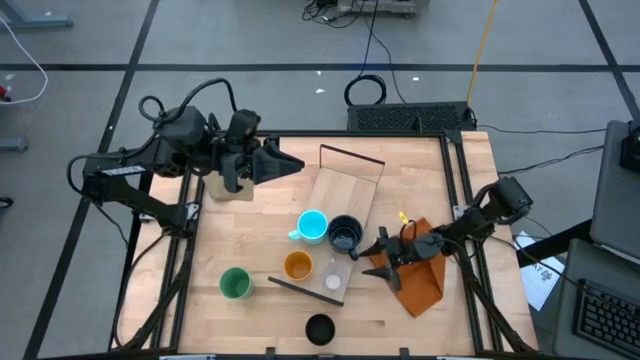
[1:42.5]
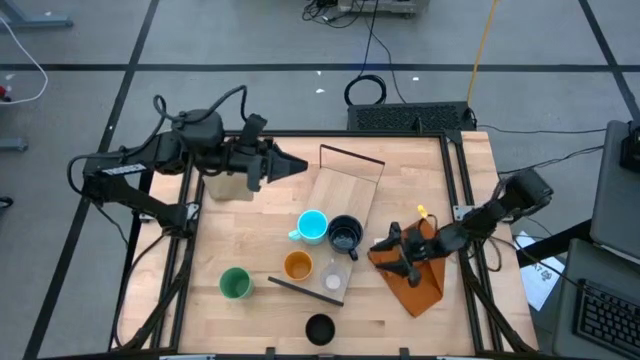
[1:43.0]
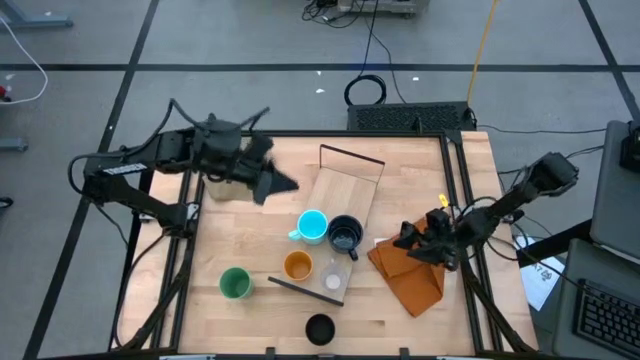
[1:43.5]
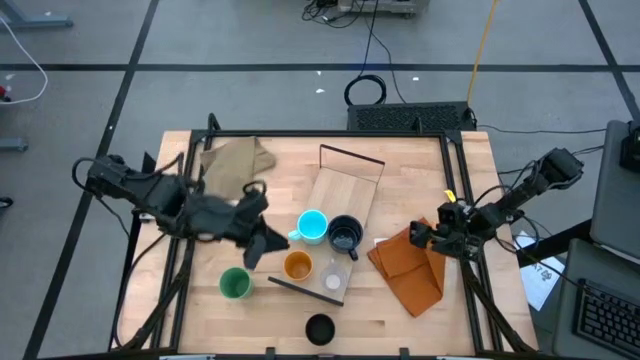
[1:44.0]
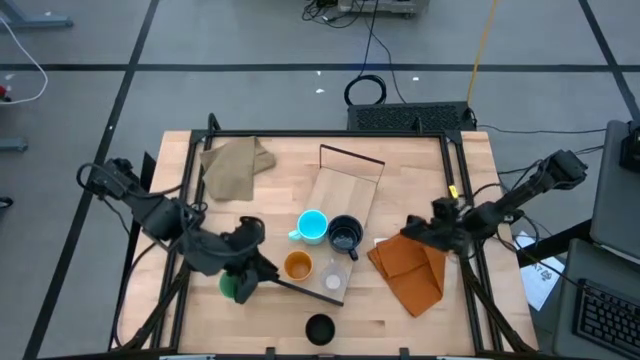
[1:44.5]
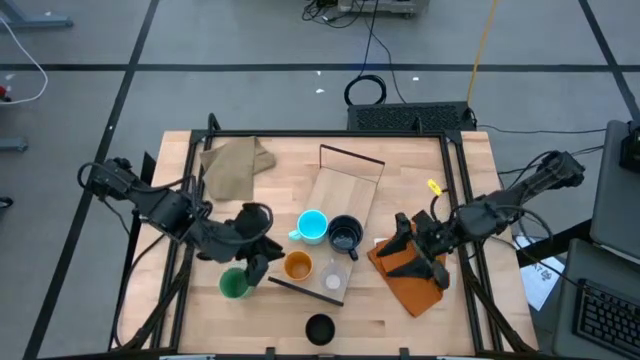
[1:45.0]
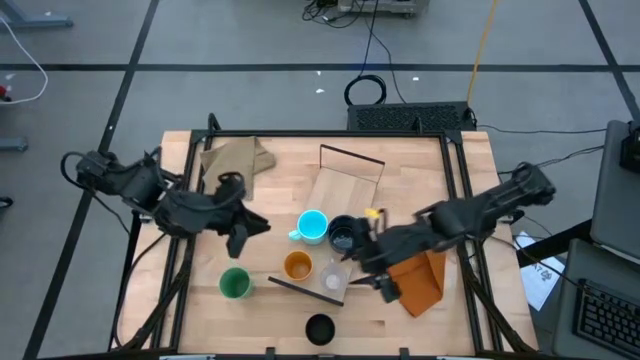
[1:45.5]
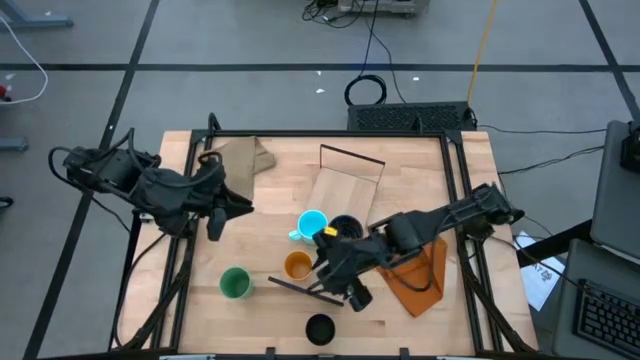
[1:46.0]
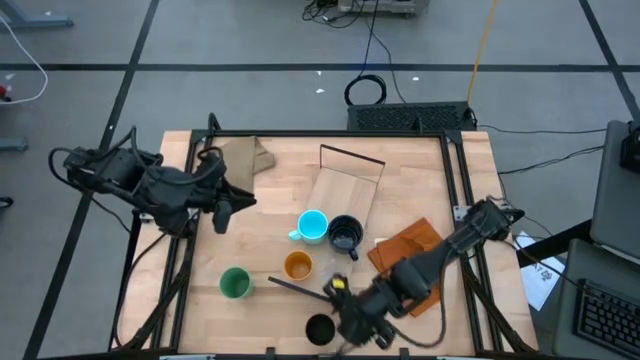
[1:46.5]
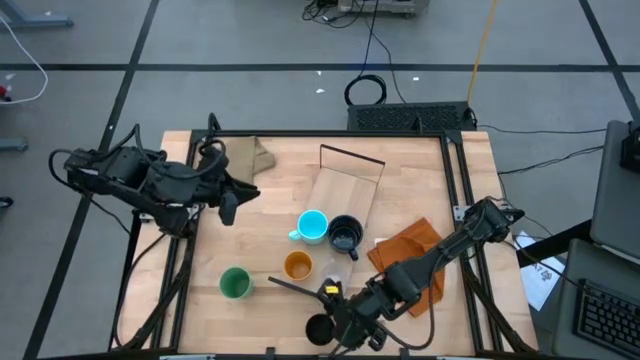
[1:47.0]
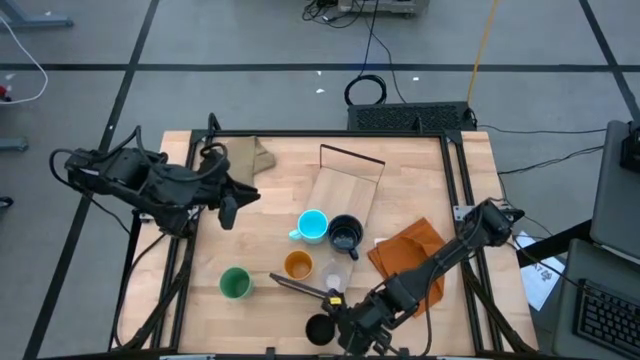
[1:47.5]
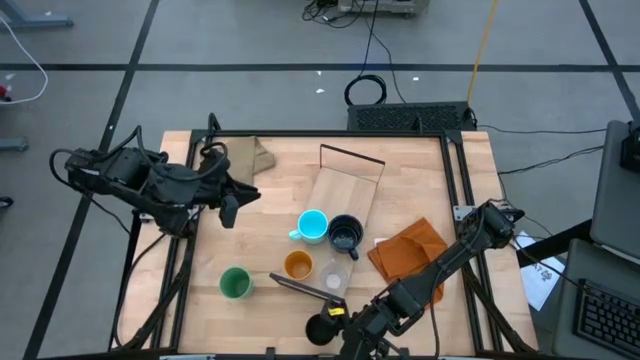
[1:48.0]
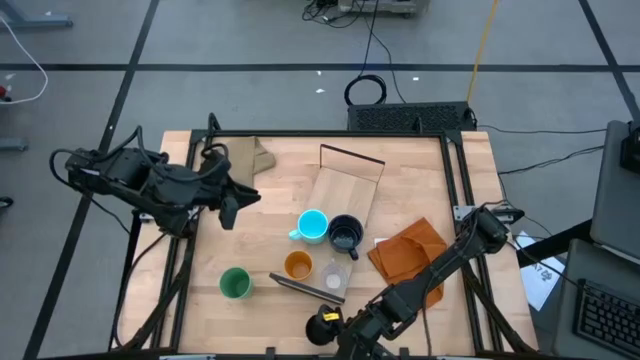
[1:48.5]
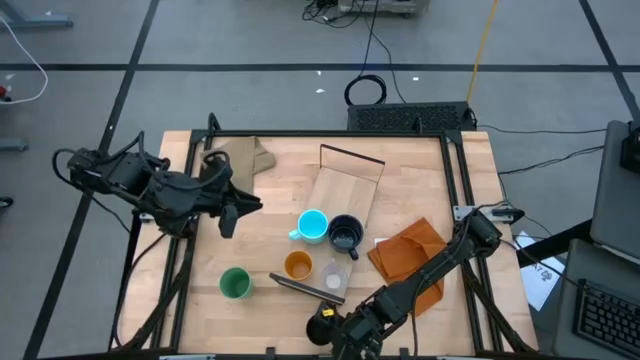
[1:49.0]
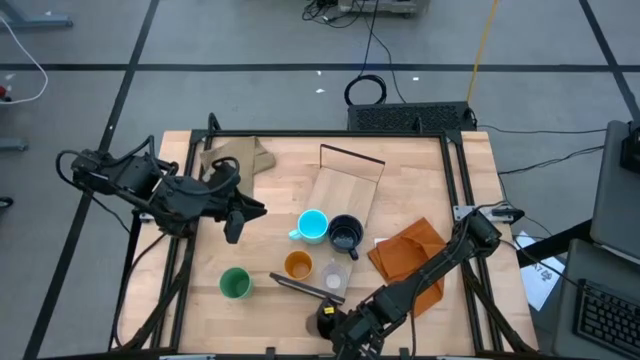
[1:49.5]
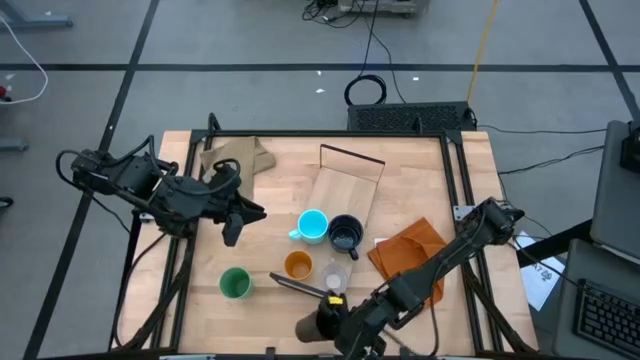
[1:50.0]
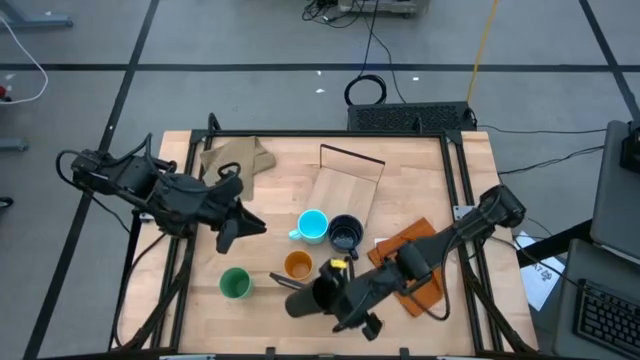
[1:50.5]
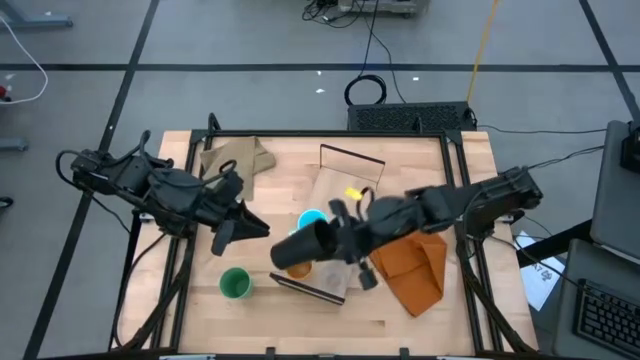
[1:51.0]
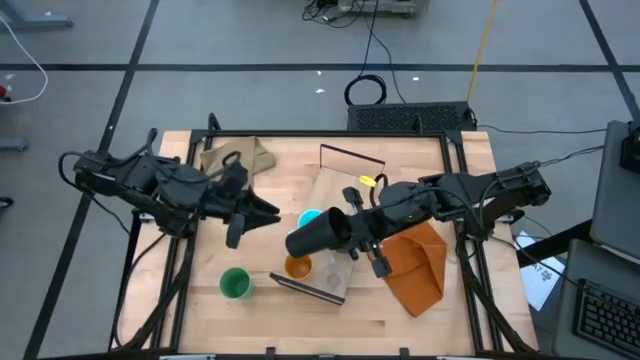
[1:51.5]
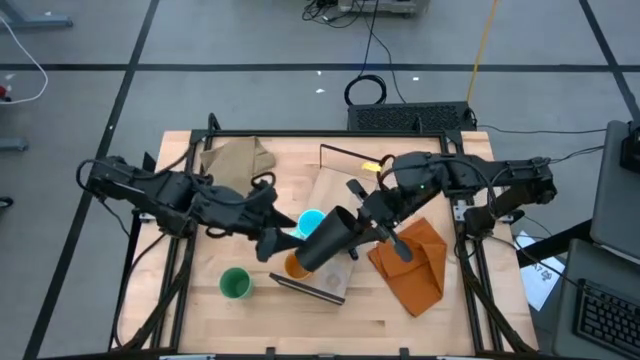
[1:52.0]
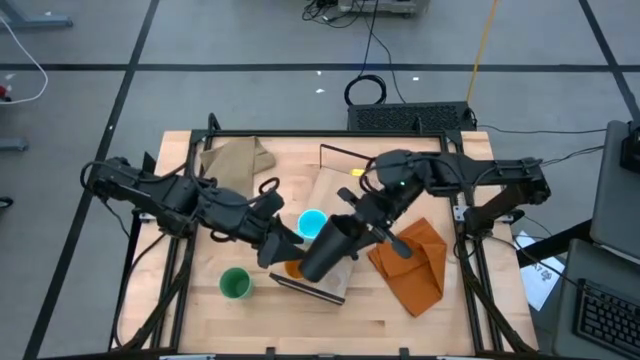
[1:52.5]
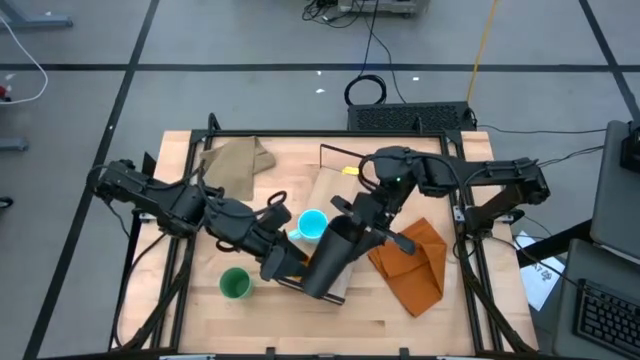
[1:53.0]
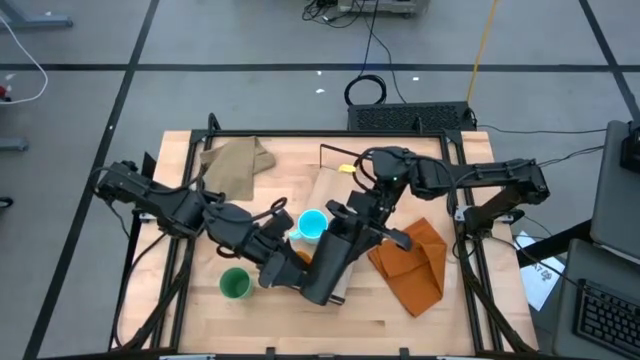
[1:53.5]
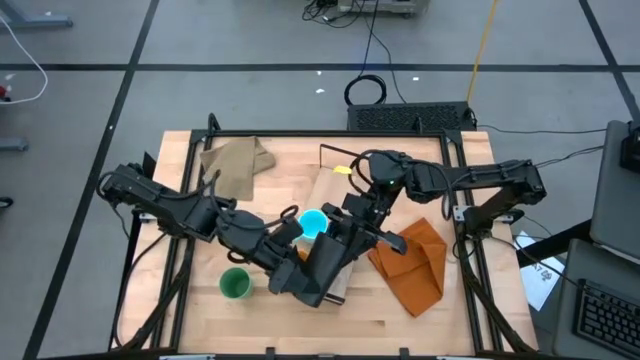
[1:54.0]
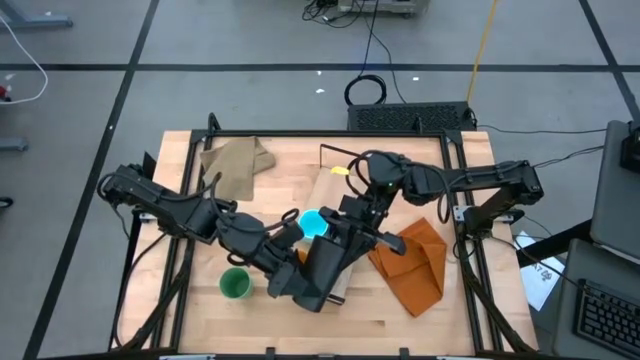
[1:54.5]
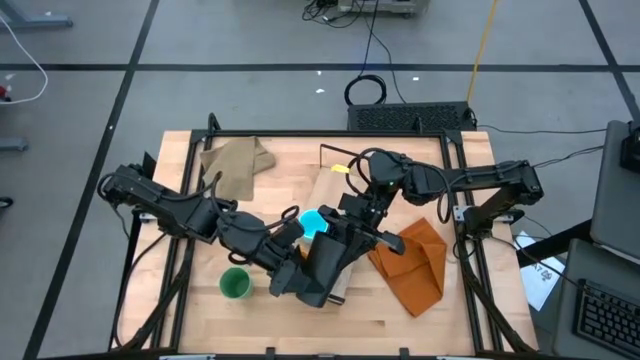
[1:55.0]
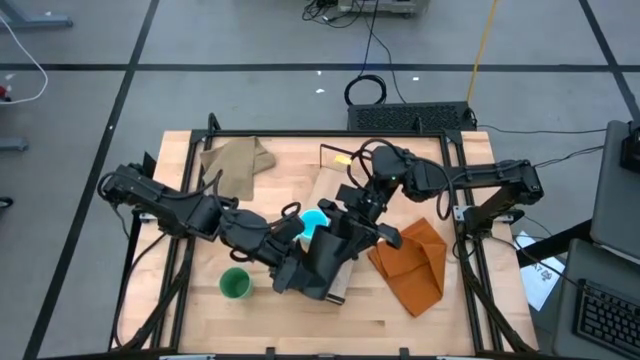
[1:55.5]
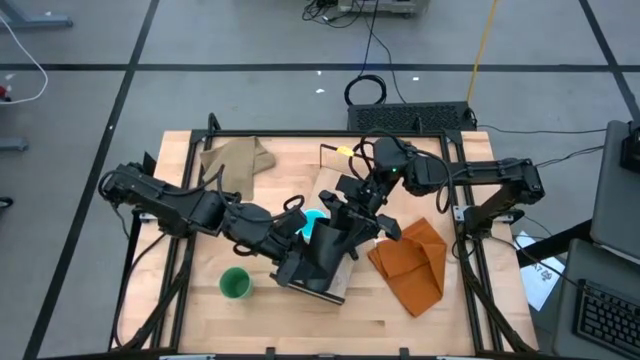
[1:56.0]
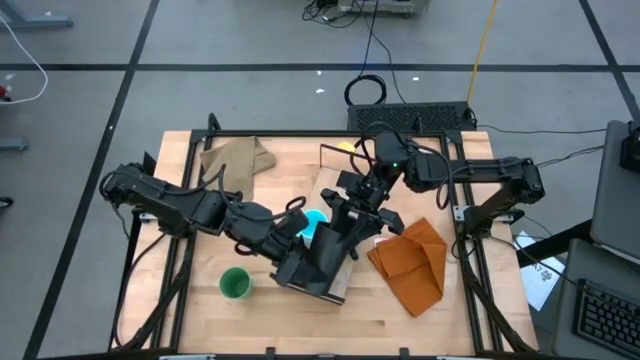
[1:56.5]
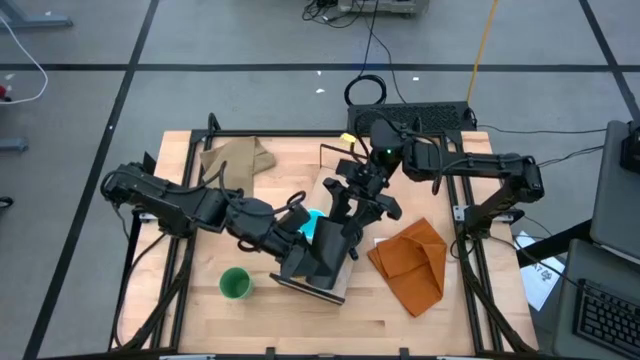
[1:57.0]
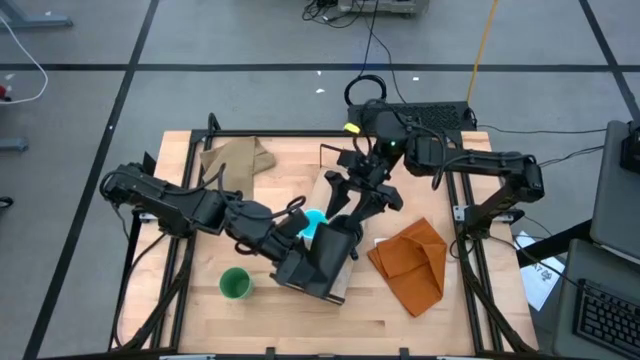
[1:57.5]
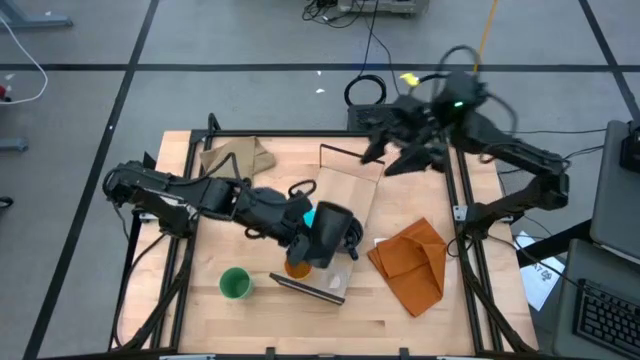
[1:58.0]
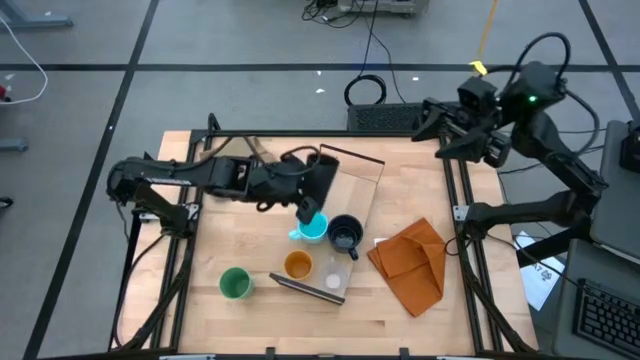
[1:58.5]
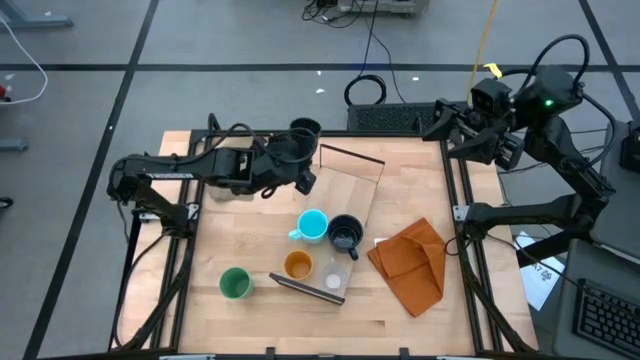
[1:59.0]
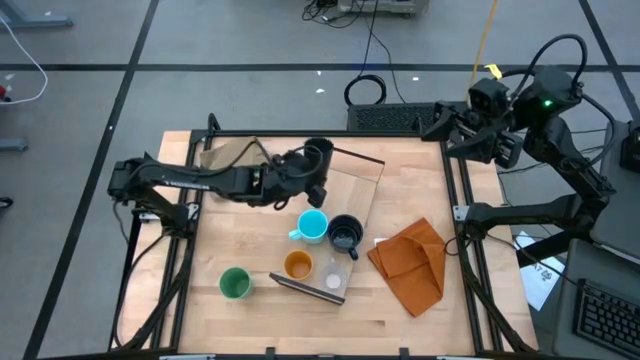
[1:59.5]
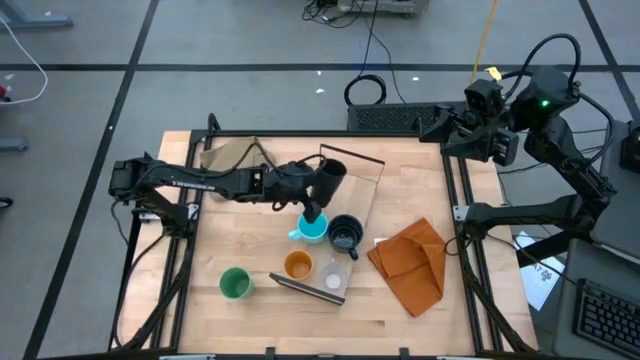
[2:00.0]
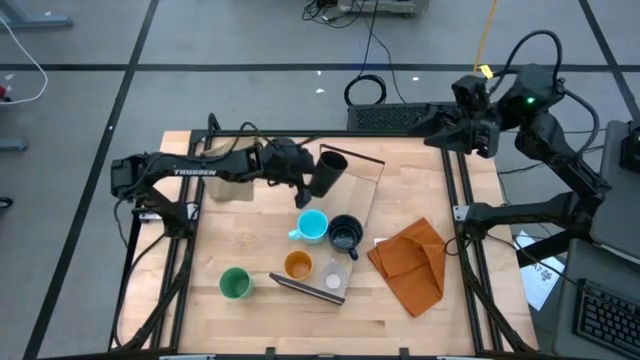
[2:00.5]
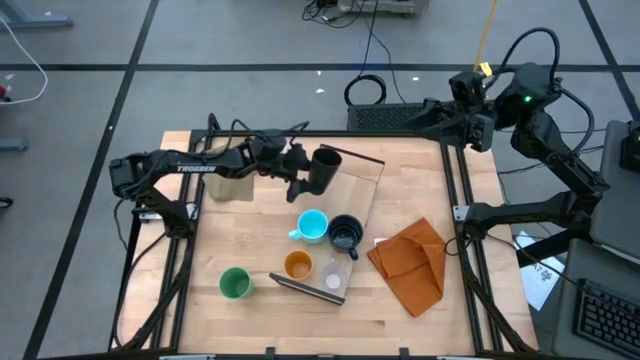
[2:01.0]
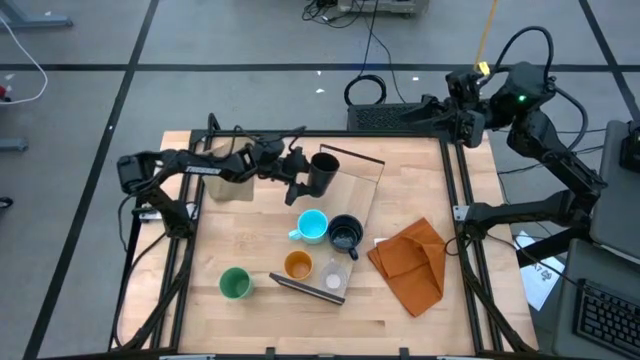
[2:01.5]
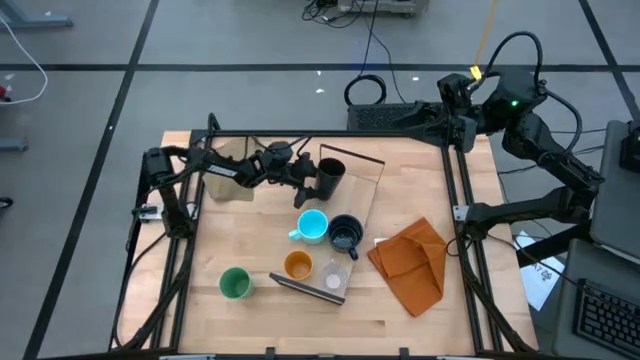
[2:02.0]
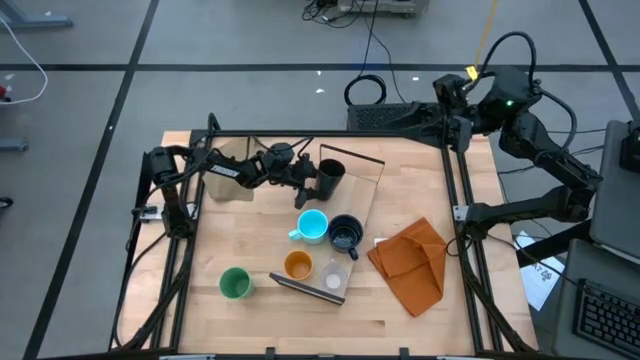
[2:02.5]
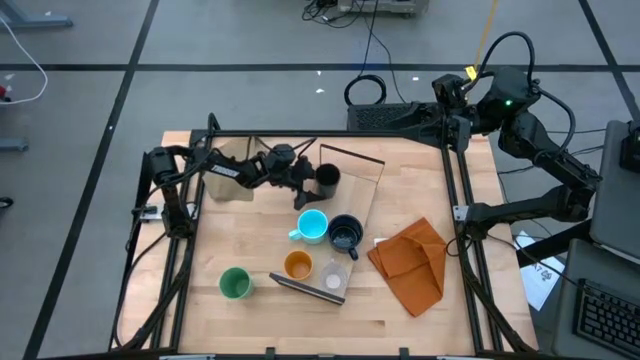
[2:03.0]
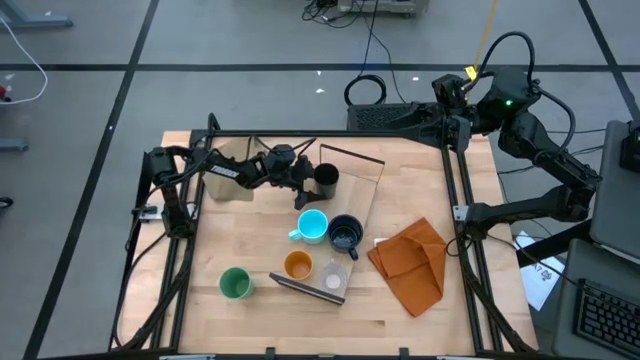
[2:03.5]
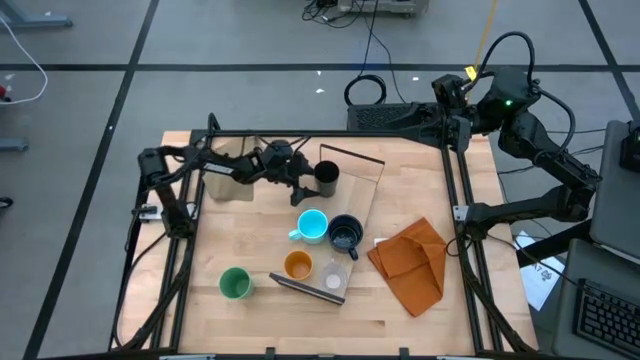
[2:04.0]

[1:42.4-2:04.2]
Task: Stack small to large cups/mugs on shelf
Put the black cup on the shelf
